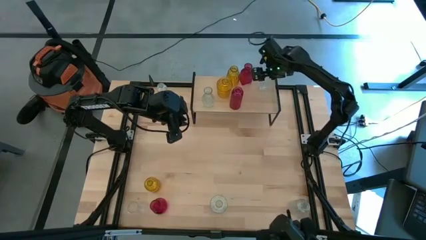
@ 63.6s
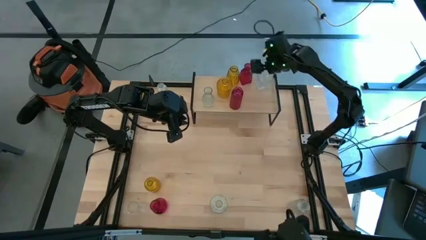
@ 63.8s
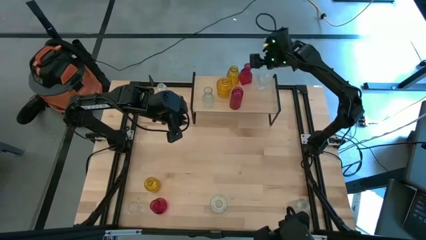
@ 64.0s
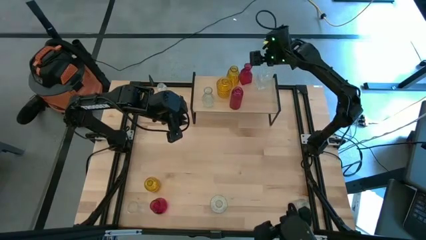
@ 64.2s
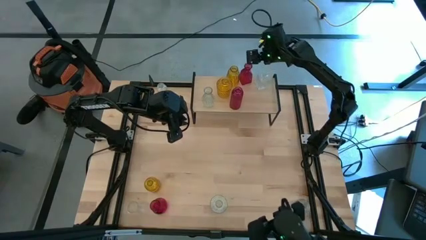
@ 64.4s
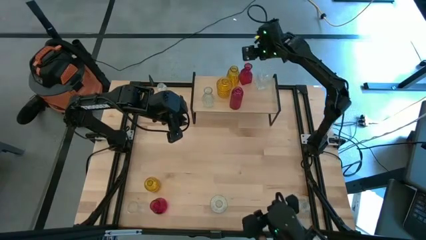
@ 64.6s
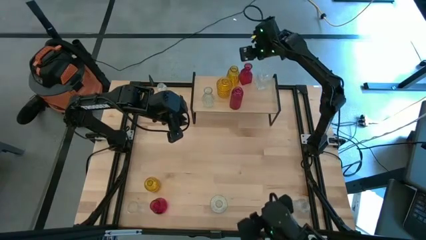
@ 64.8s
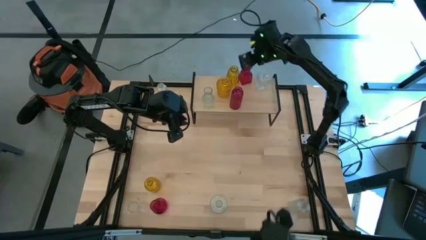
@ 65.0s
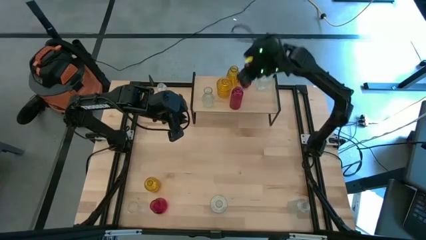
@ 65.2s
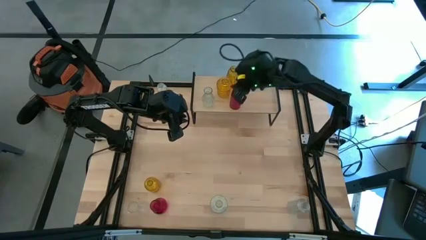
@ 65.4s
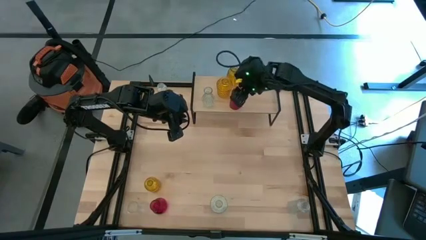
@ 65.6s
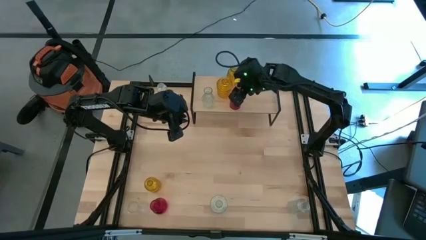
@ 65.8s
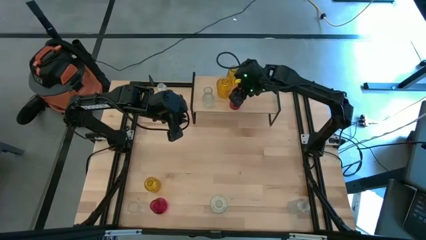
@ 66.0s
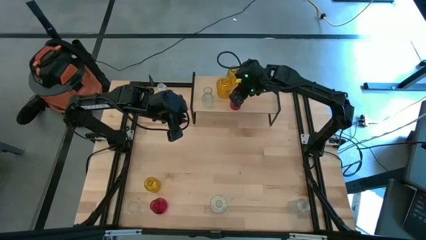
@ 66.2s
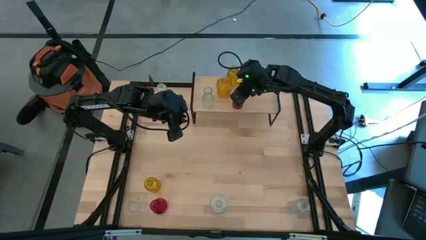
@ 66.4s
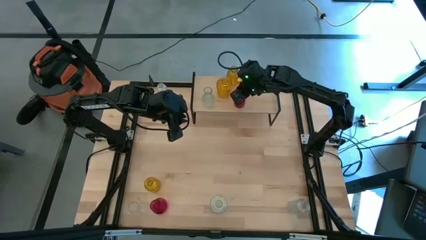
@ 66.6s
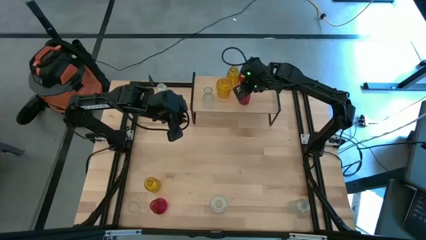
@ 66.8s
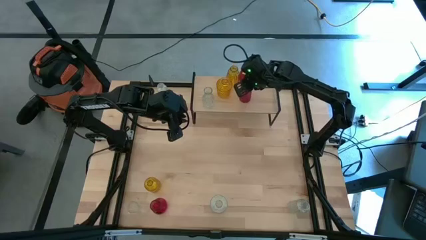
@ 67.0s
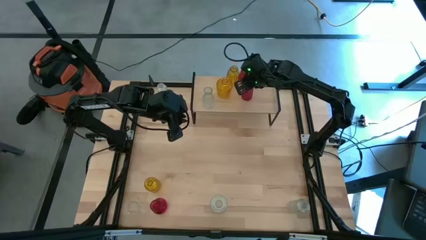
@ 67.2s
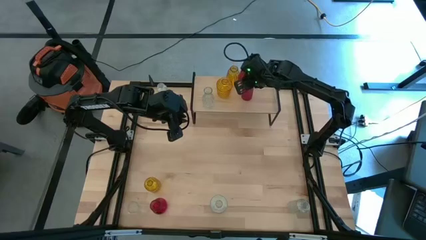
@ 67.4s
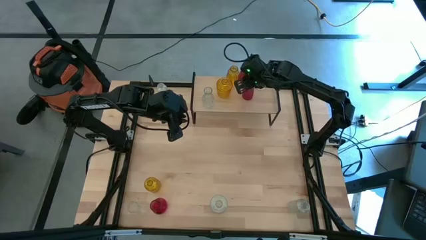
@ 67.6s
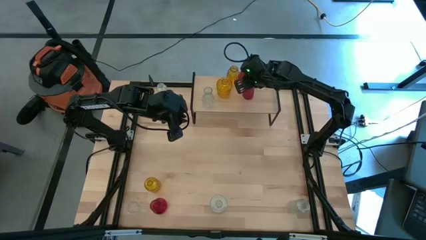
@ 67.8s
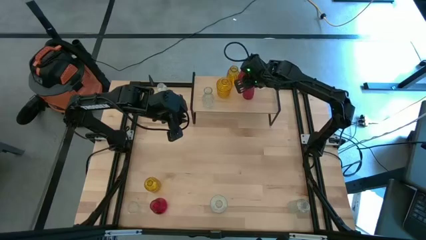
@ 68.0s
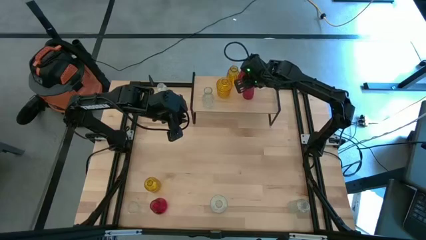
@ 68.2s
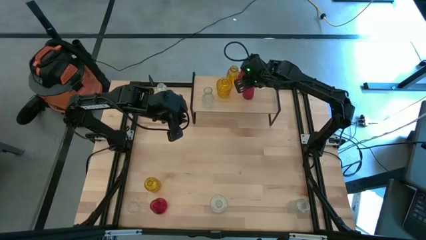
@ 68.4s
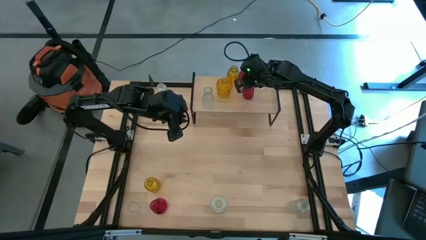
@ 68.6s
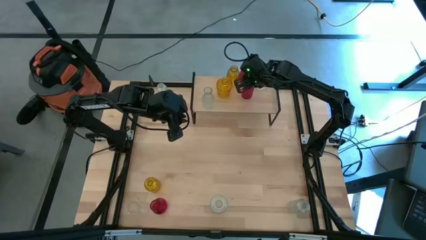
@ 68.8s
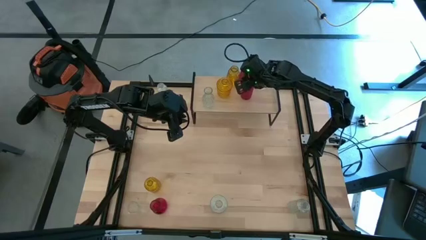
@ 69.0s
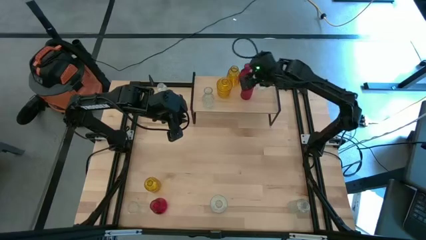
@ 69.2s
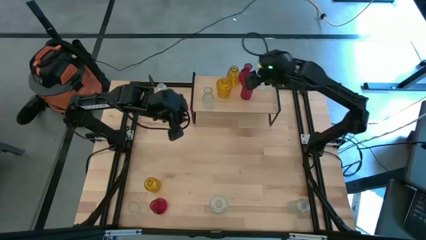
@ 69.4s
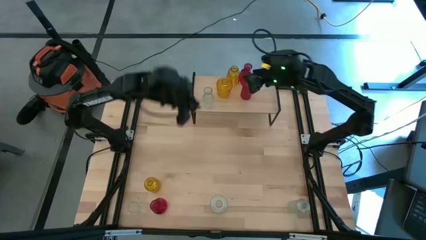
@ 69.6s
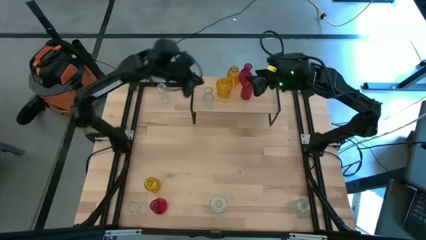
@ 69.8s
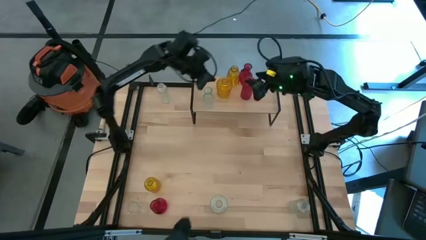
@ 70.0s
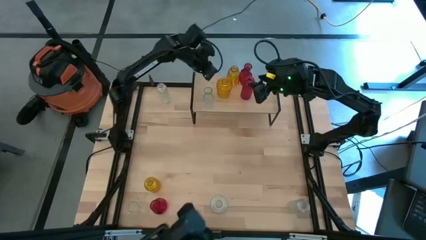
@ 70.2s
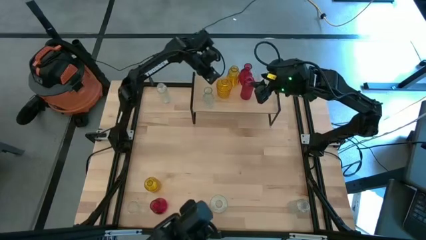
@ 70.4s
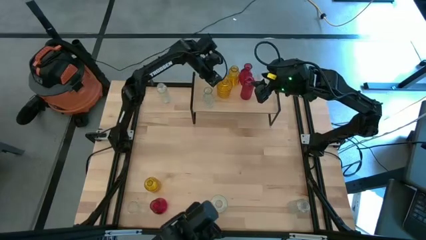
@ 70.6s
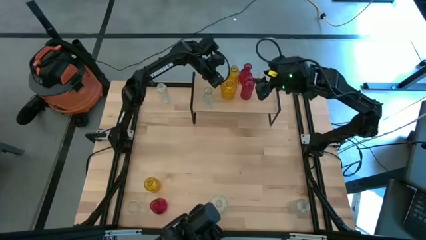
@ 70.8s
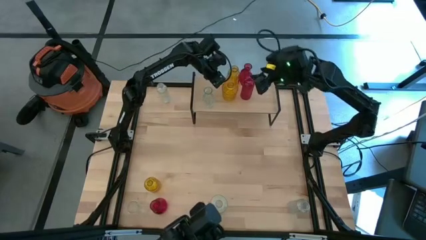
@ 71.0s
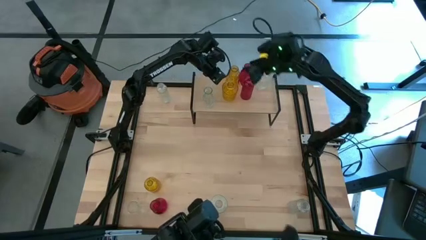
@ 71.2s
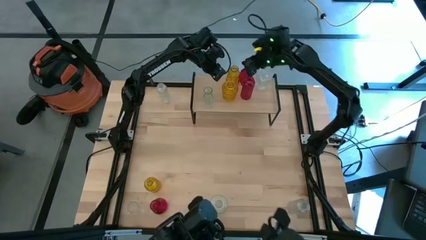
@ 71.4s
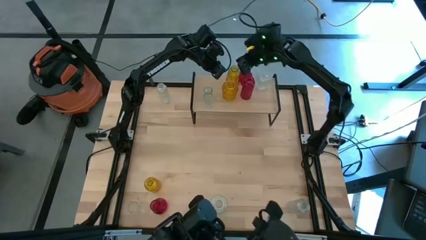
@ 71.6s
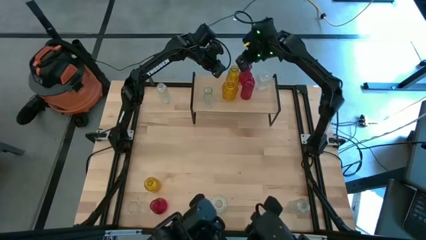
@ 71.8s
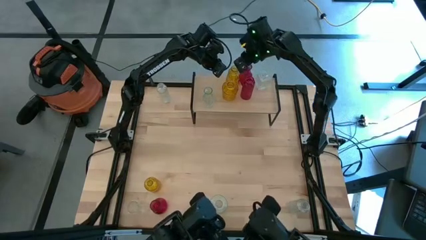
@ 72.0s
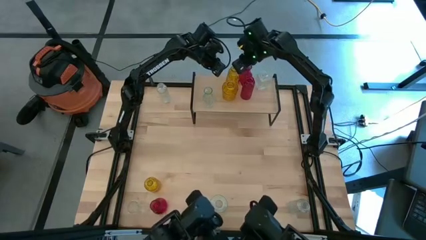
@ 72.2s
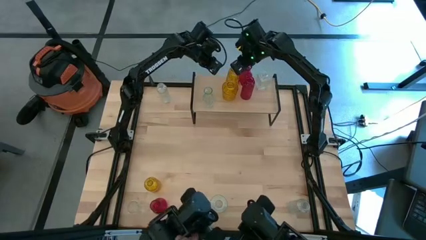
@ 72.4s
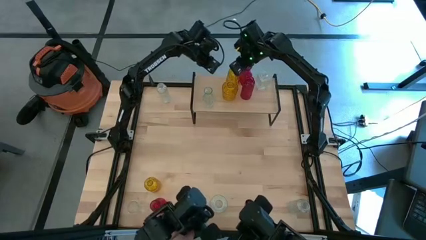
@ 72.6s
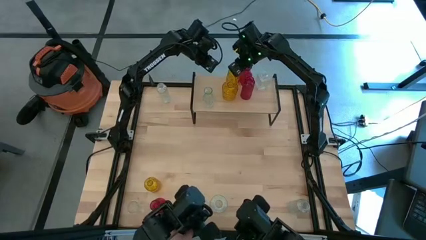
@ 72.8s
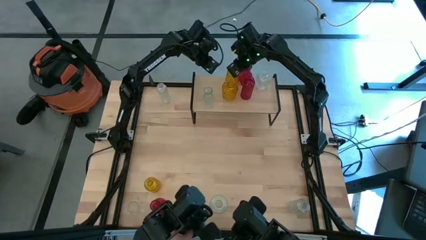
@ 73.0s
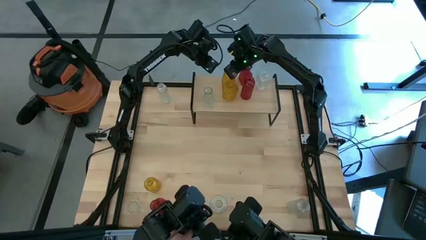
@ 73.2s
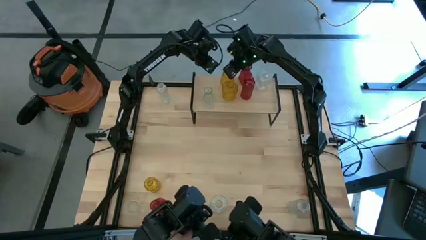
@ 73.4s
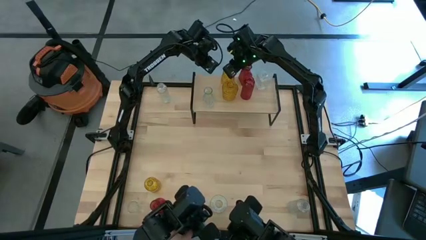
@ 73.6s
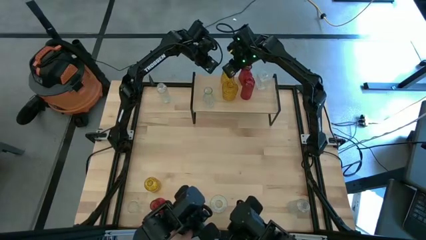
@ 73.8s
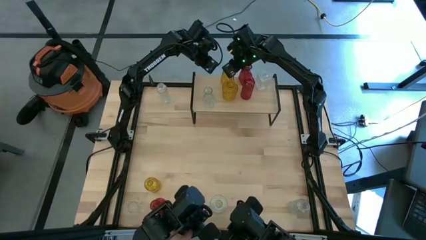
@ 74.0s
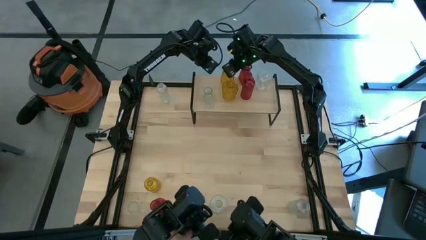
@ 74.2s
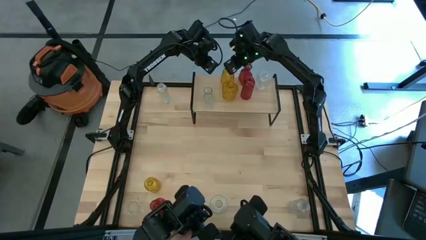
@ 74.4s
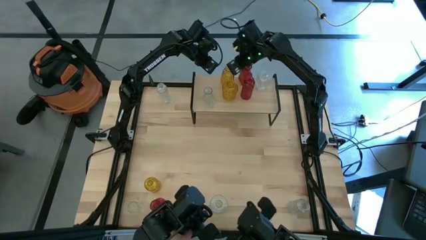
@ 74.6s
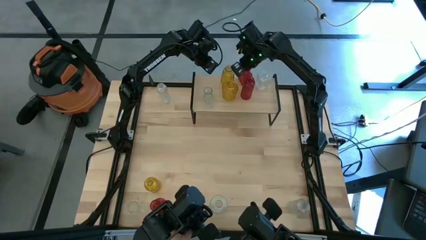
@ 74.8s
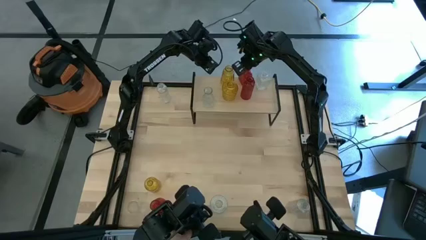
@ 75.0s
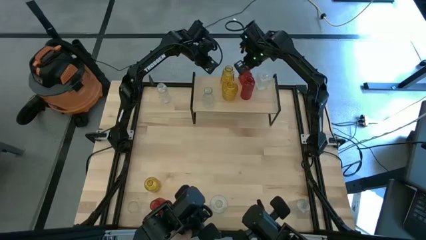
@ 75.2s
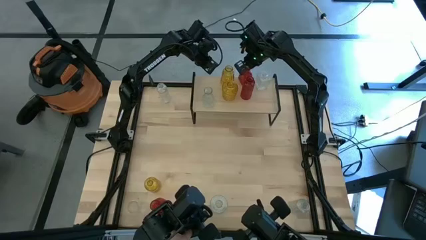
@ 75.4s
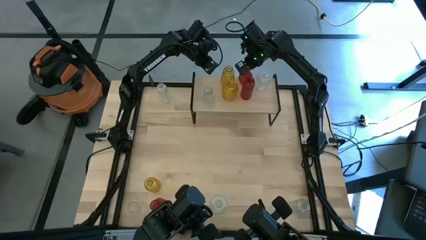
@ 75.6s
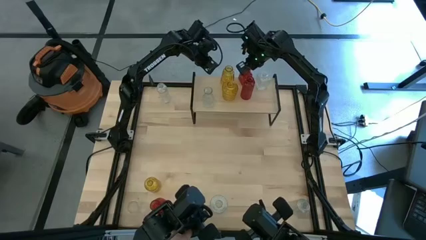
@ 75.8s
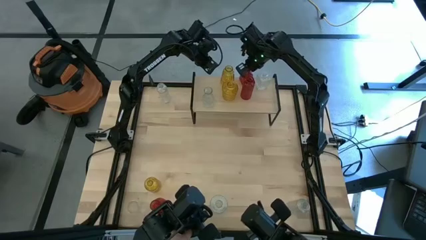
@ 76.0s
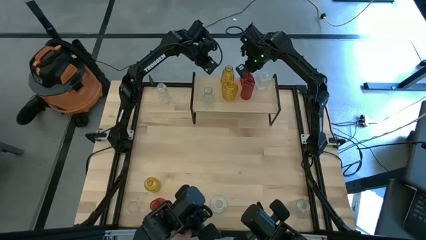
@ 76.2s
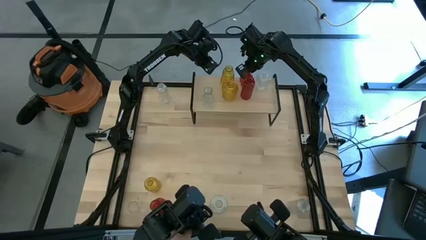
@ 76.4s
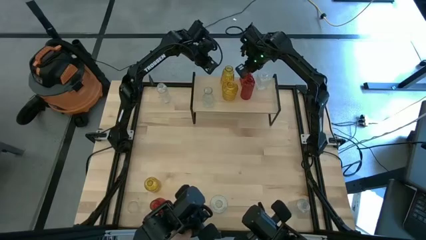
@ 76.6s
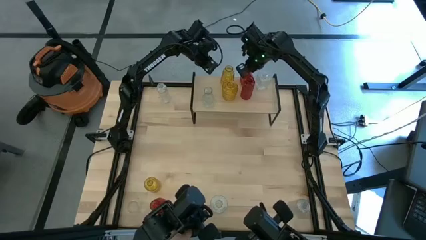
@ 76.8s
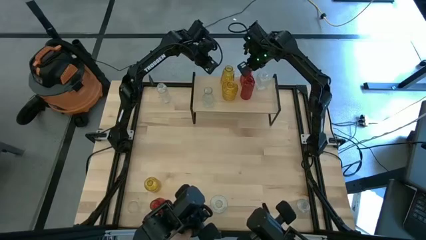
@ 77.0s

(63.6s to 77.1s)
Task: sort vases onto shelf
Adjust the vases on the shelf
